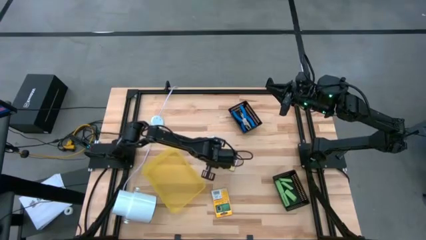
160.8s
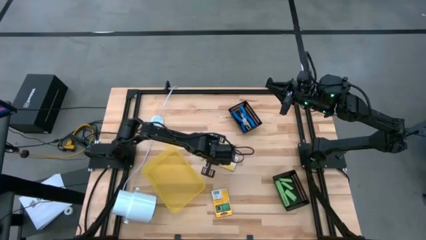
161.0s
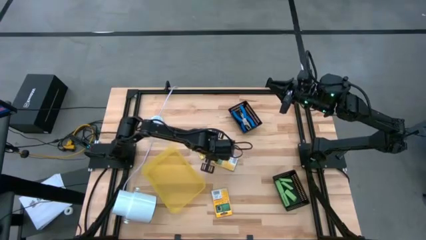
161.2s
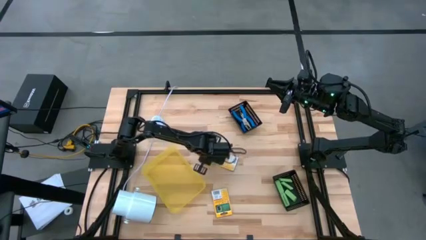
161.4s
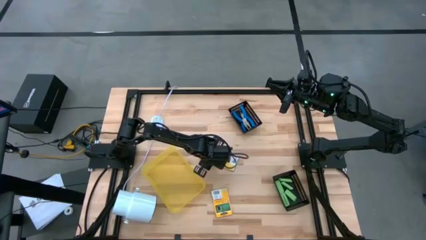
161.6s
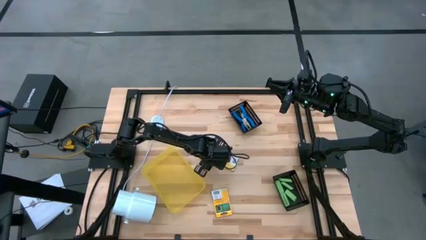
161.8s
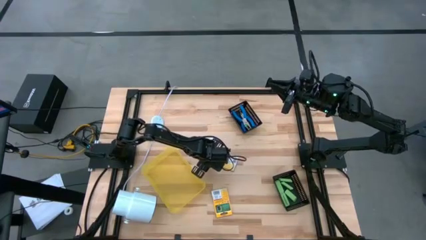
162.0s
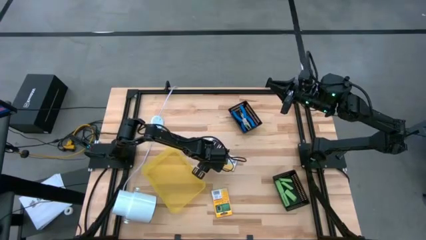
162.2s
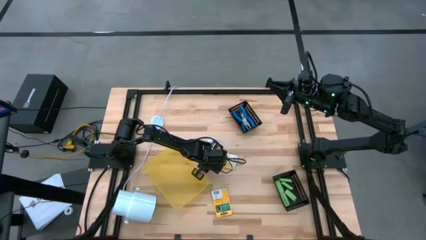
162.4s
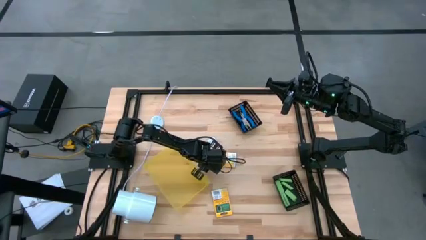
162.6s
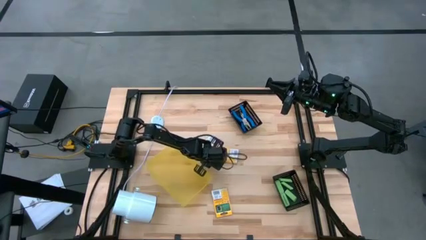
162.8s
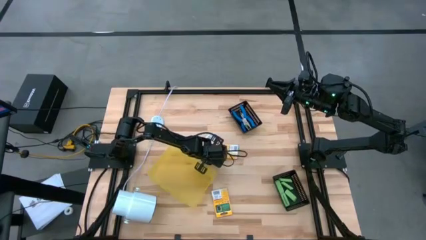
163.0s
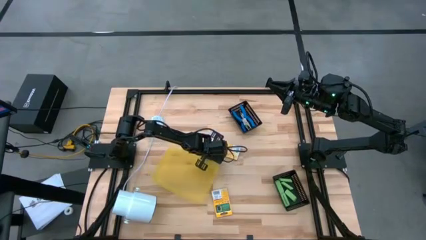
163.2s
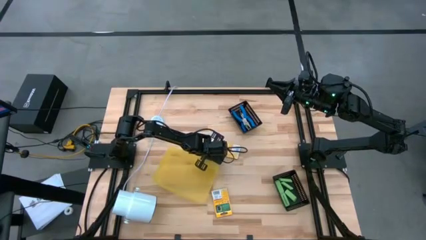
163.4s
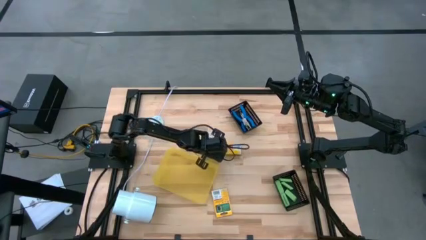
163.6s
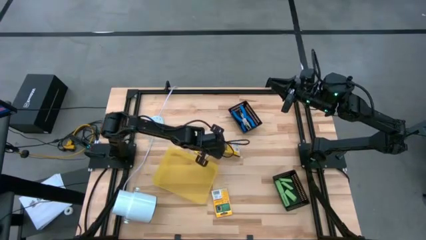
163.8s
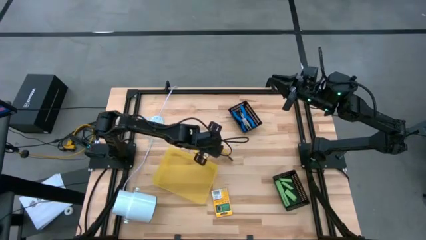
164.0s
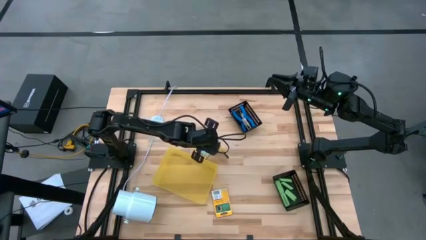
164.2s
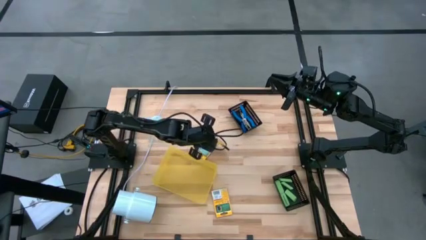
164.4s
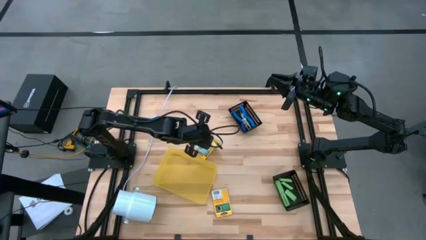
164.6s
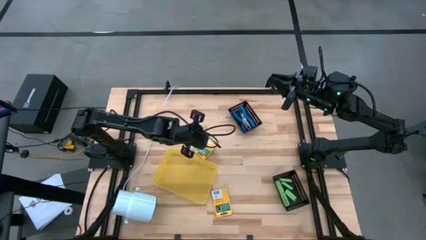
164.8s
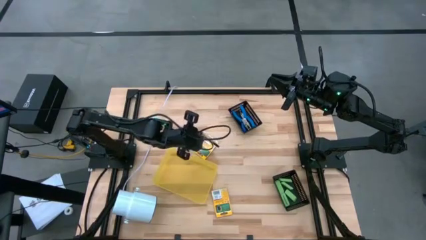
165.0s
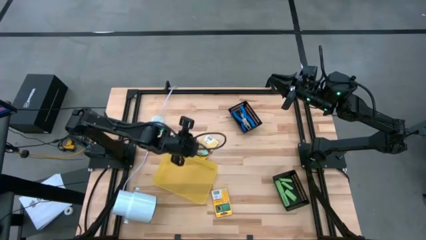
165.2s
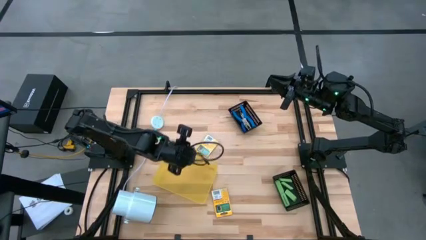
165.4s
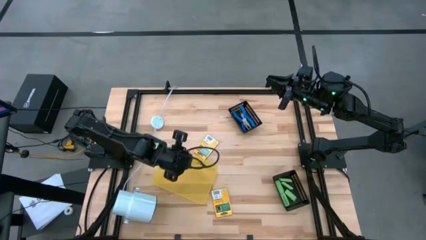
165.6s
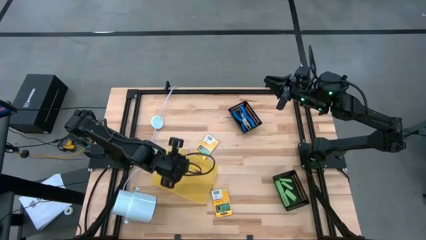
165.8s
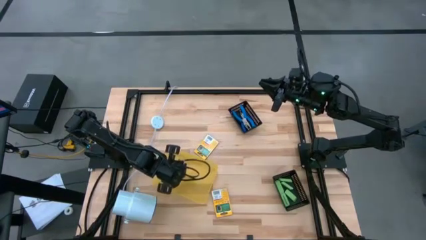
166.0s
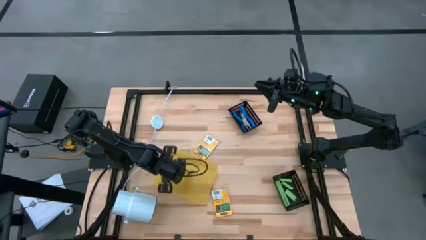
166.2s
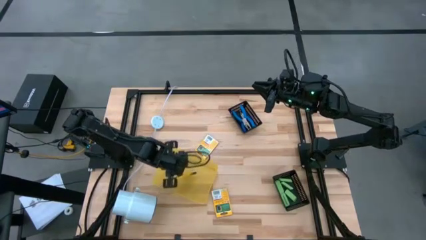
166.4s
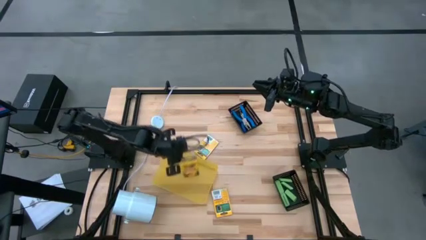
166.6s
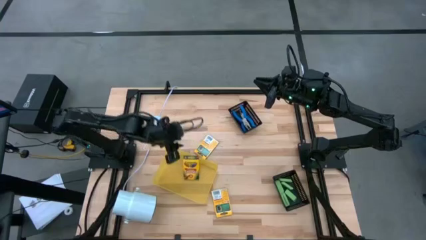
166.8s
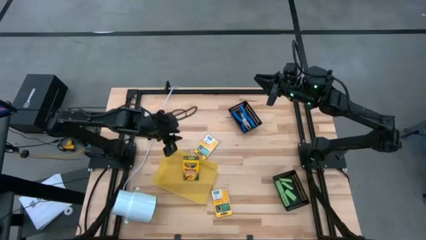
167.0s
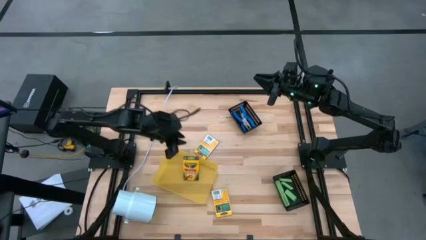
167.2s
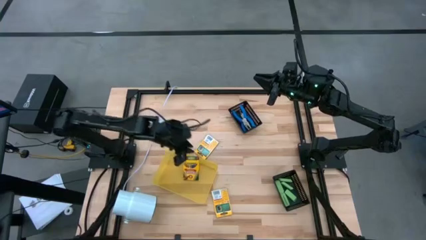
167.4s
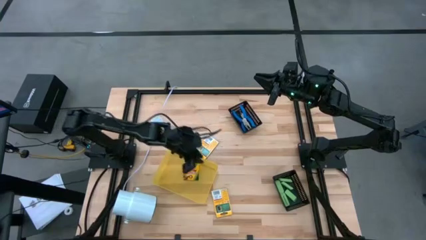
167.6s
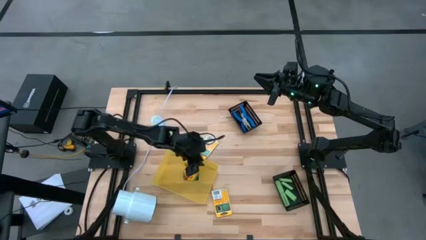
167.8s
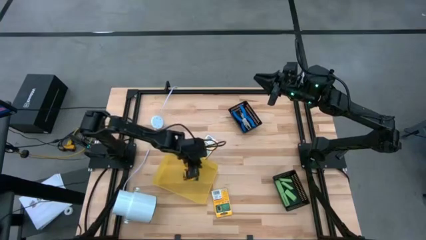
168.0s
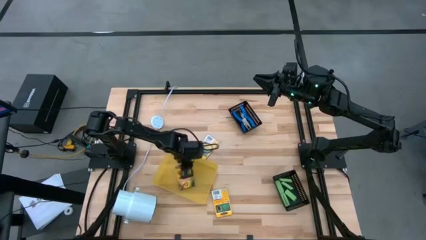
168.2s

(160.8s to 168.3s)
Task: Pick & Place School Supplies
Put the pack of crayon into the yellow bin

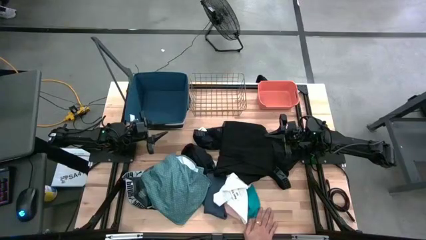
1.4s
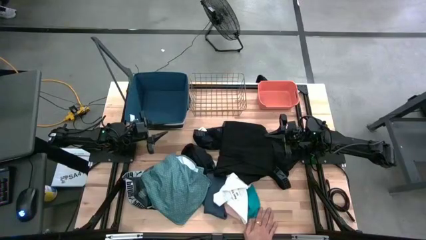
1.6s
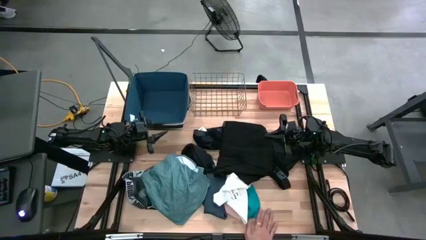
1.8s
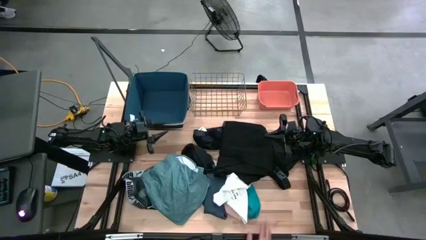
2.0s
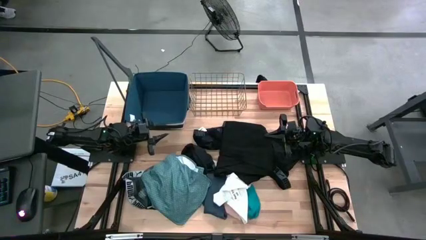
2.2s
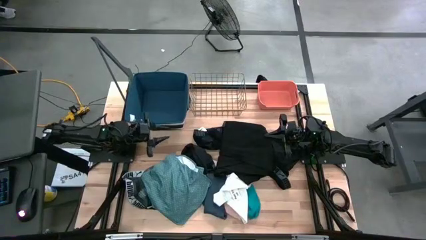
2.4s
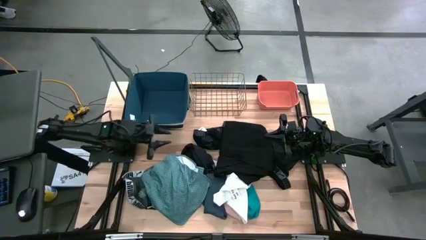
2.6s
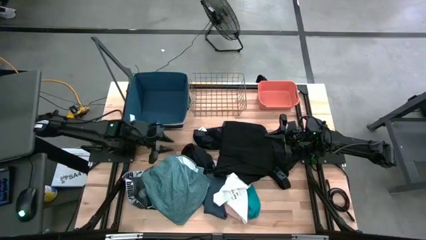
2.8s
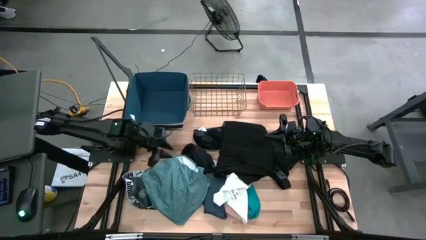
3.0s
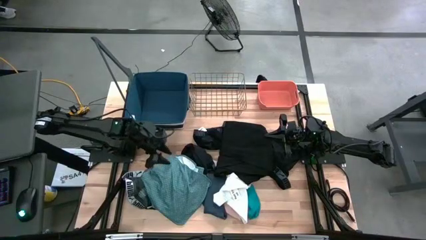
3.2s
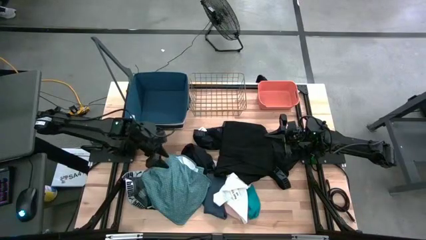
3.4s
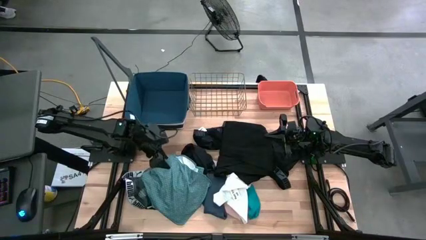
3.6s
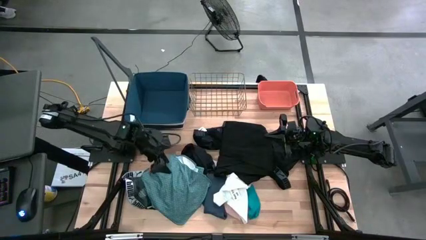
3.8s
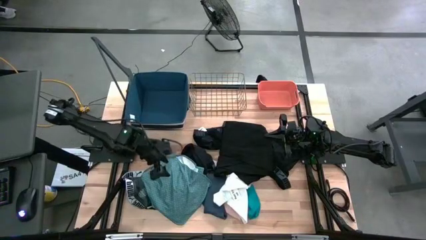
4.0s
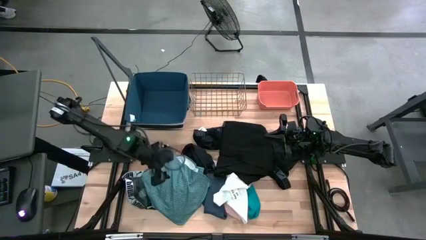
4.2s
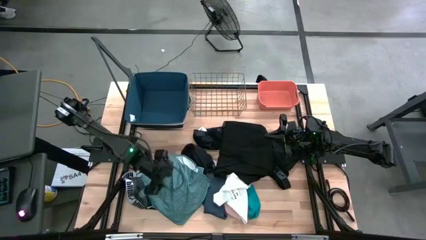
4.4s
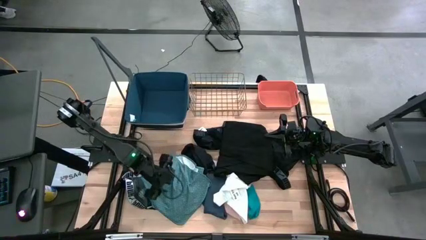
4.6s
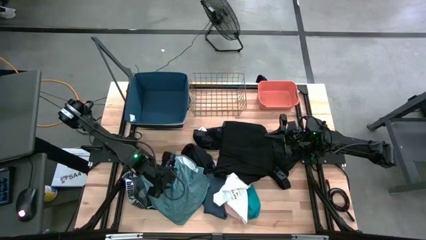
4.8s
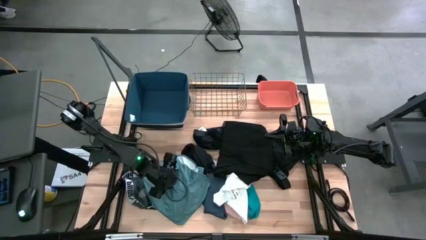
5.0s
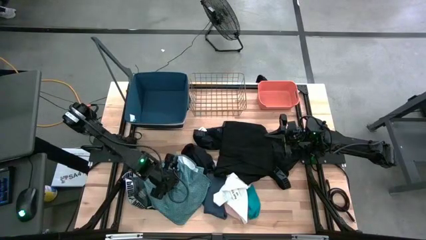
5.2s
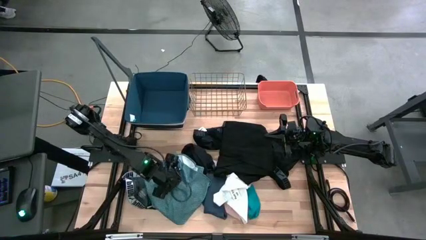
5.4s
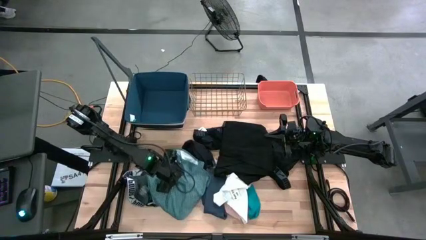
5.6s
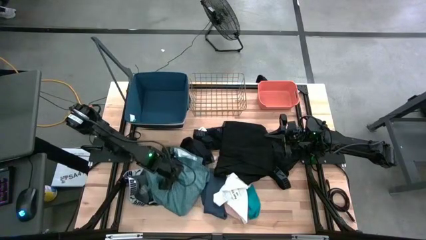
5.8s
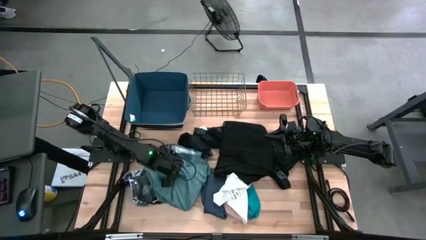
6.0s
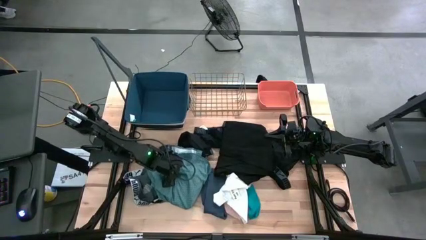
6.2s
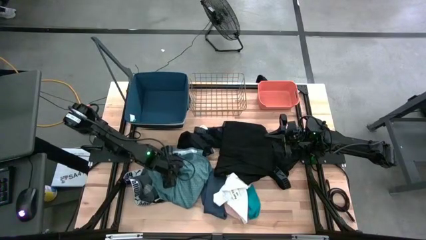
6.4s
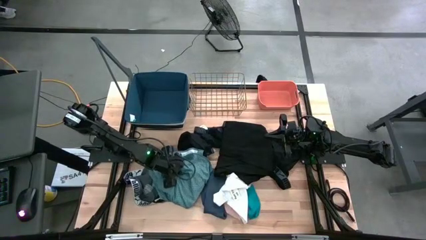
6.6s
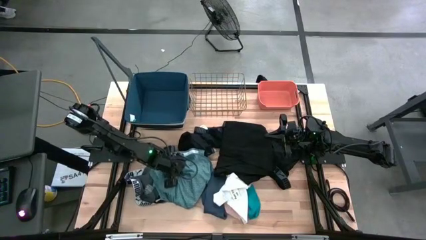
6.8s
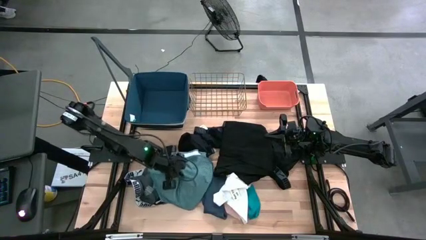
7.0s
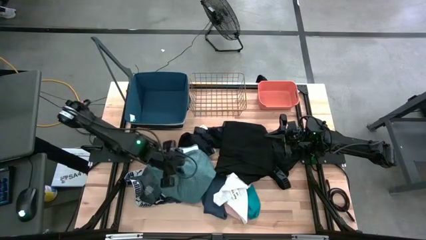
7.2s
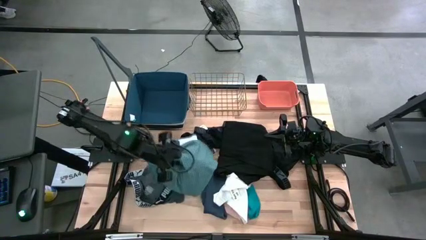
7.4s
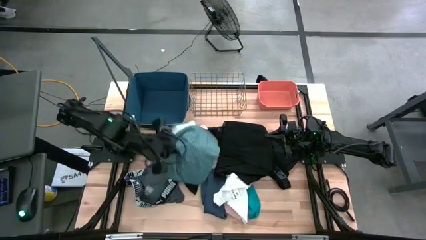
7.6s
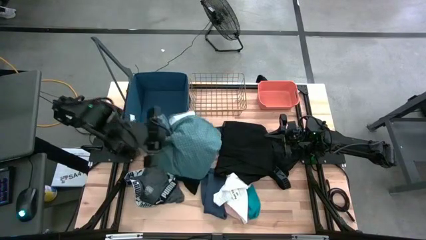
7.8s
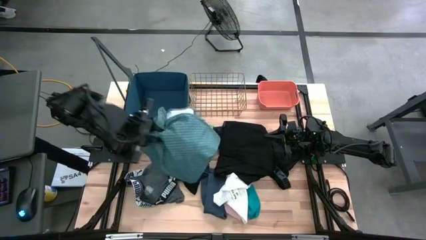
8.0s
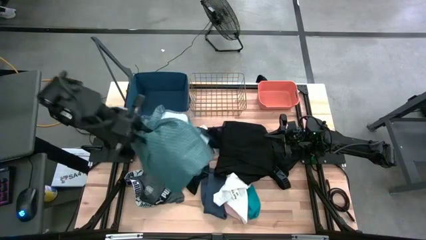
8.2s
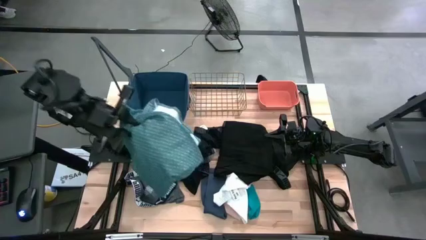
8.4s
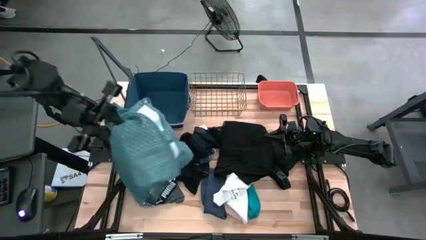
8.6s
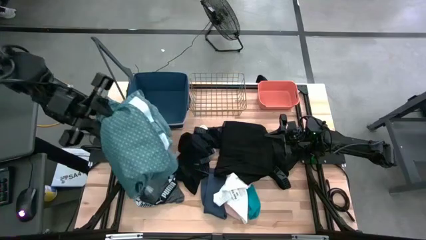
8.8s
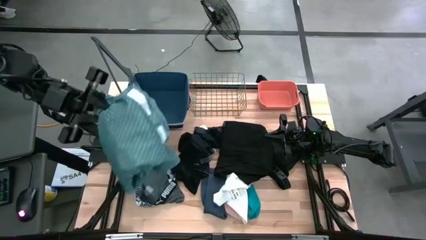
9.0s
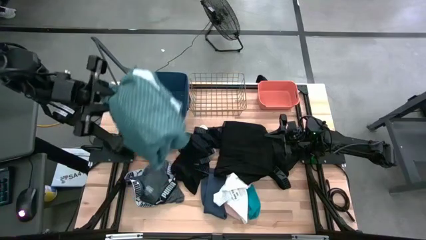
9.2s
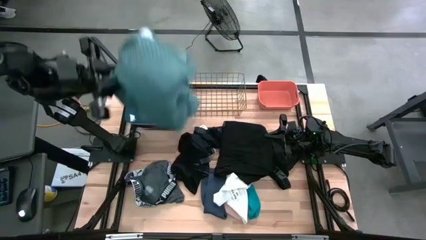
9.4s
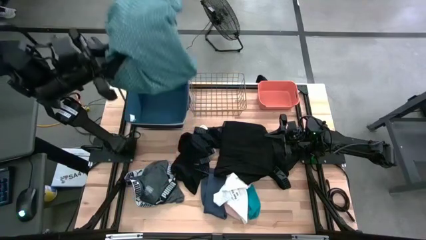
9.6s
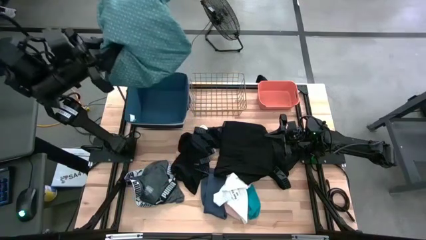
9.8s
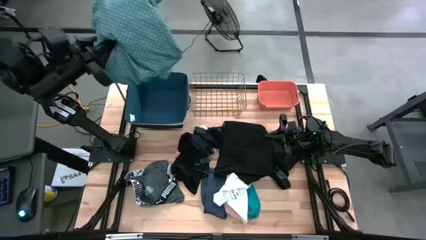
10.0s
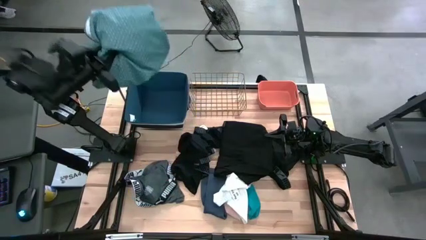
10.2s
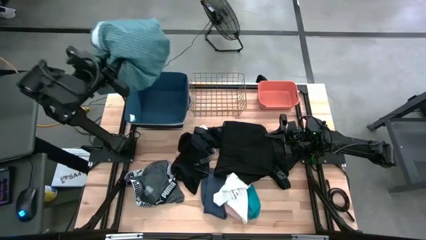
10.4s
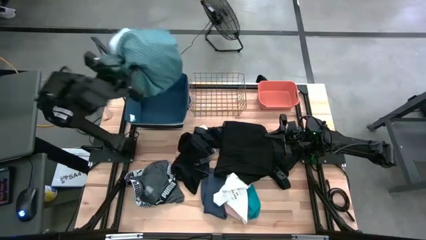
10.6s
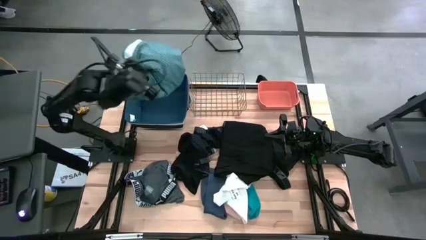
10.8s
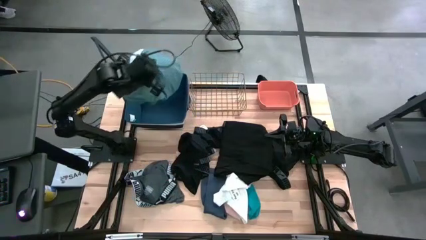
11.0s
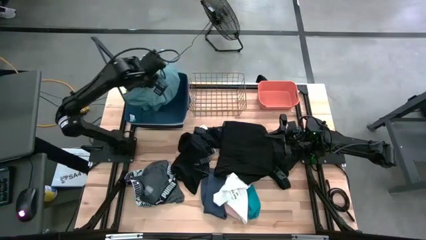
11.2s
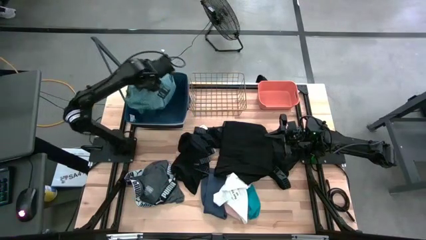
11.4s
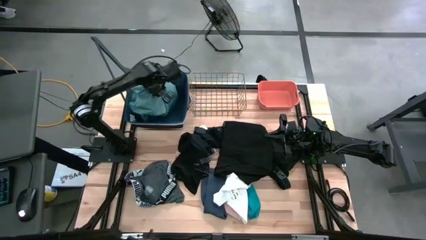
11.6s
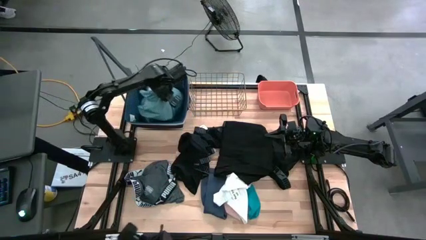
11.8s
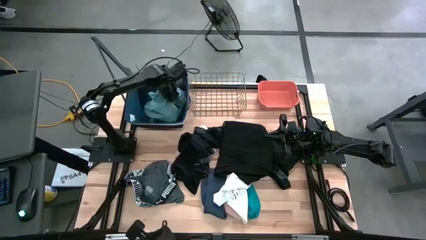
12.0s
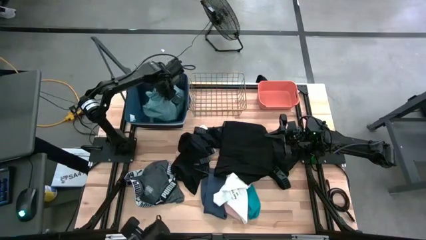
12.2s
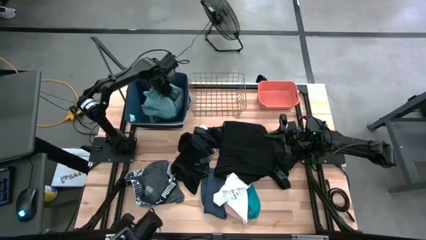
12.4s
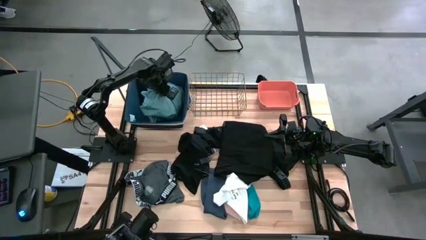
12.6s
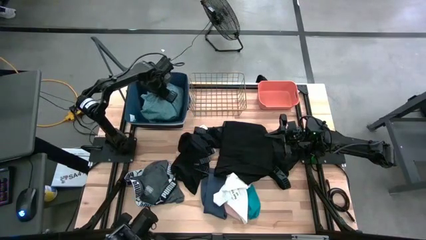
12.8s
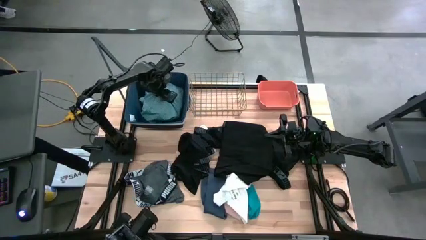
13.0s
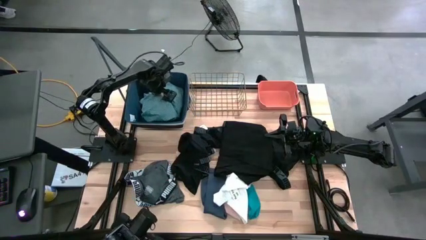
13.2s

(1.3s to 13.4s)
Task: Pick & Place Cloths
Put the blue shirt into the blue bin
